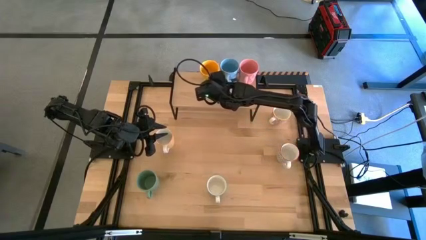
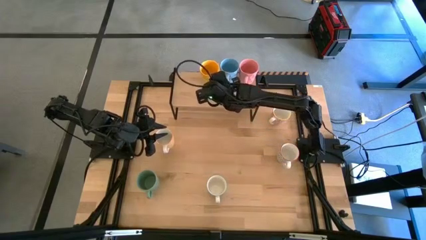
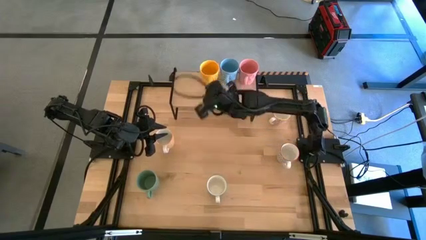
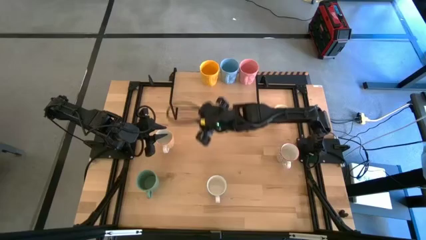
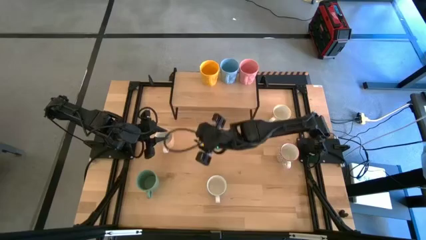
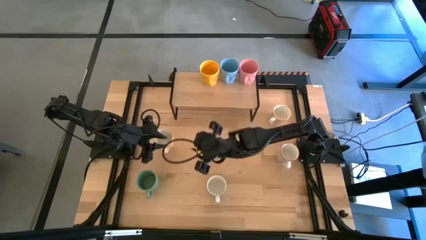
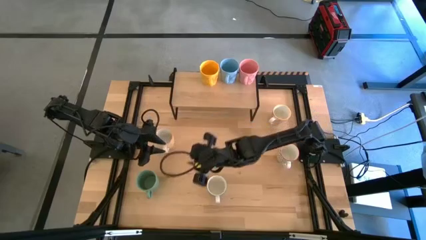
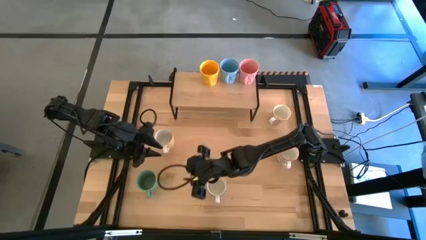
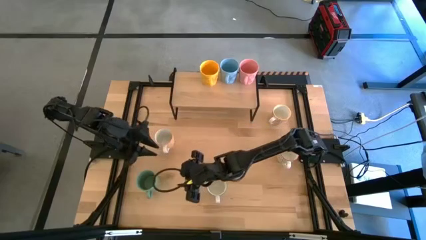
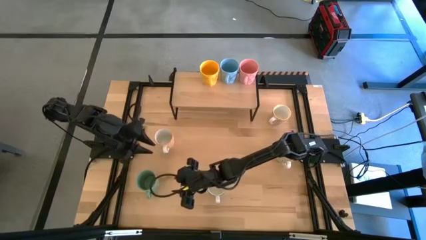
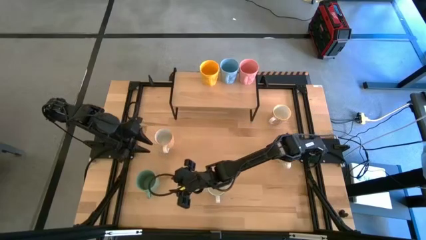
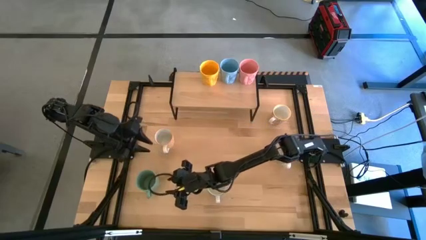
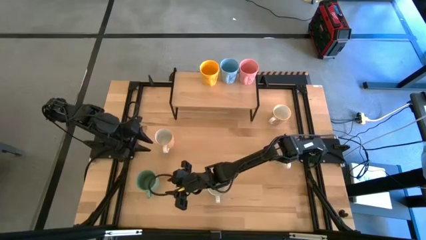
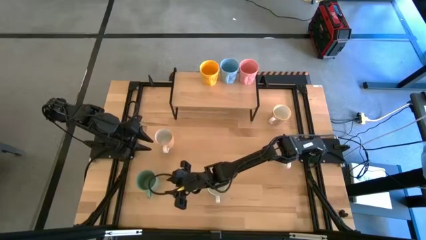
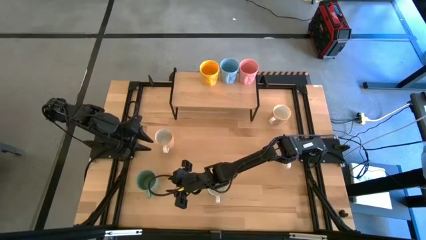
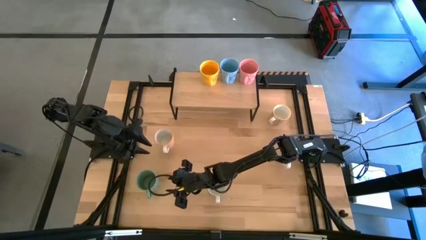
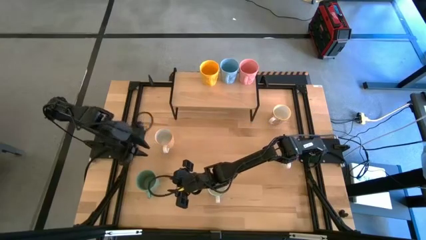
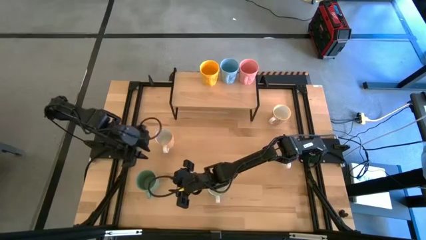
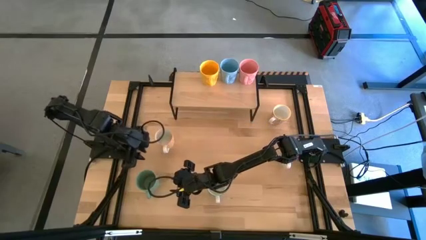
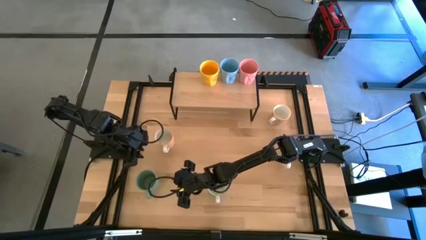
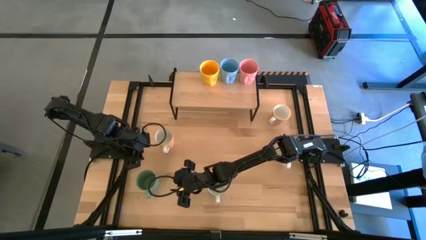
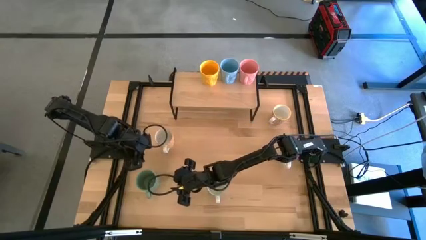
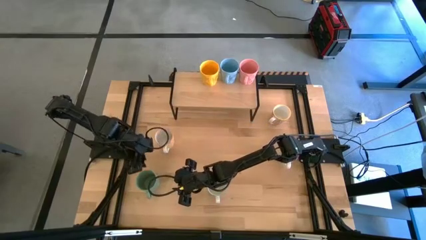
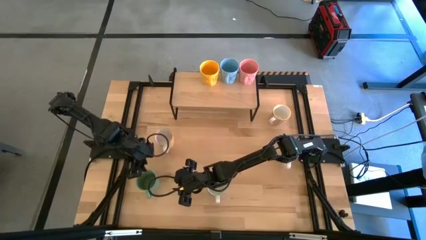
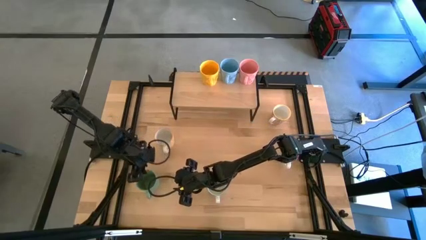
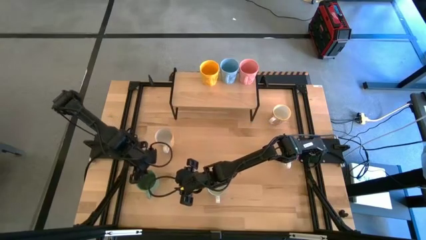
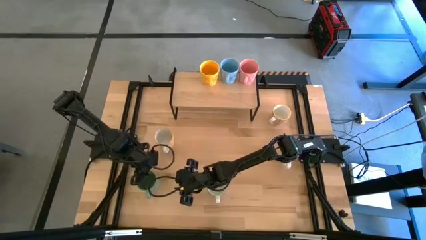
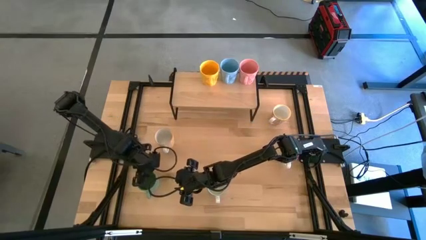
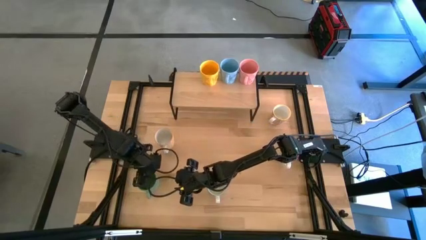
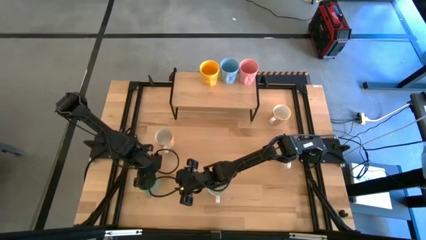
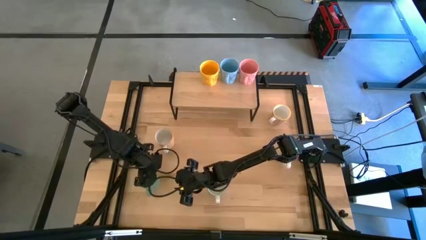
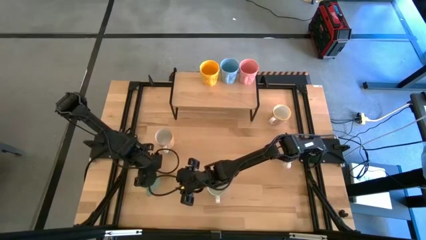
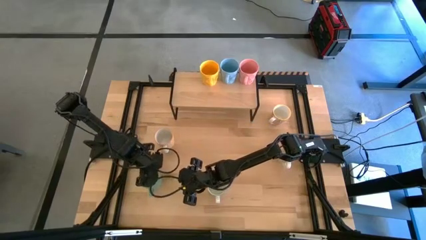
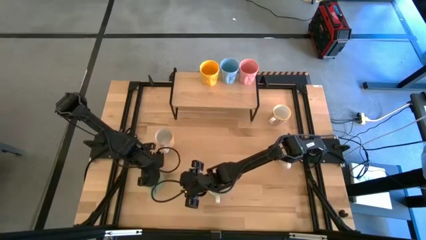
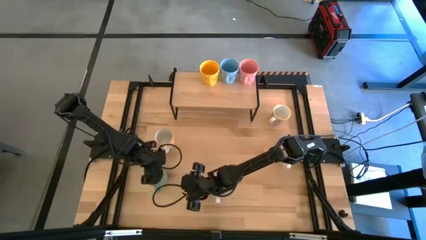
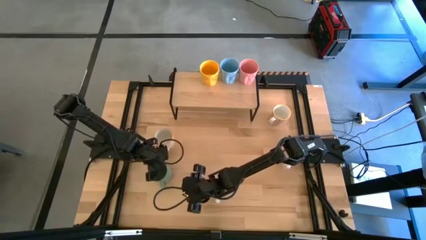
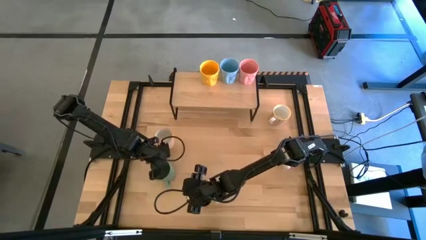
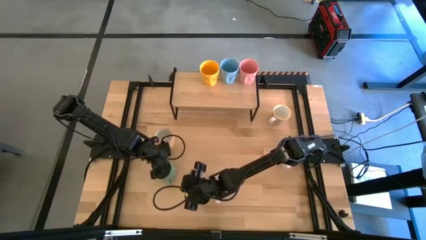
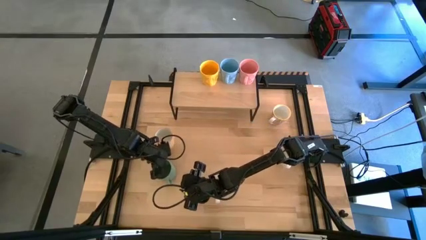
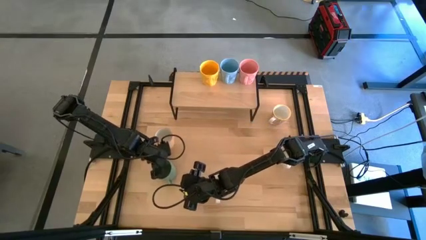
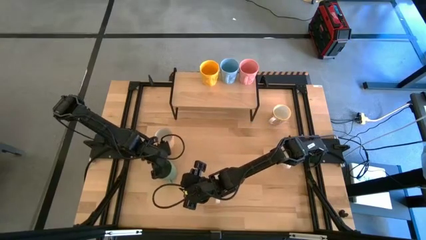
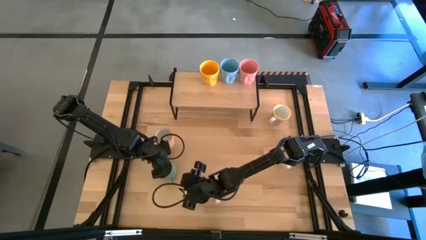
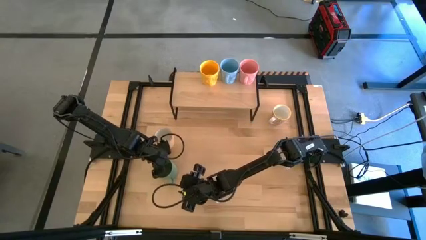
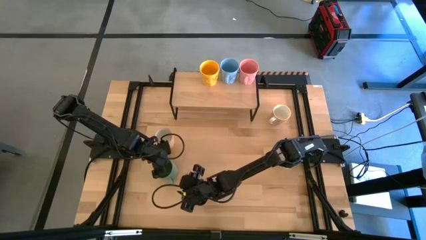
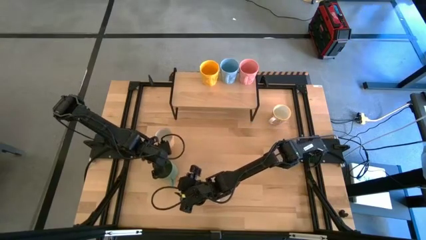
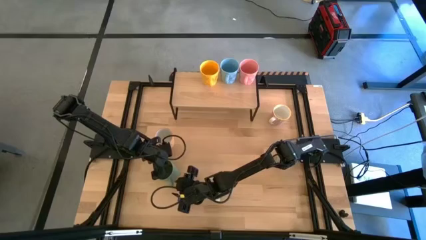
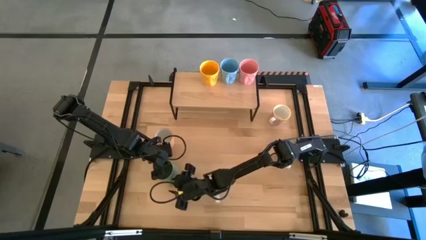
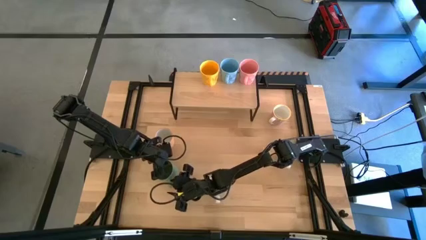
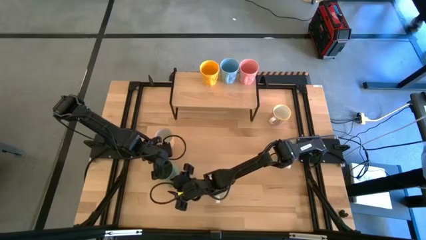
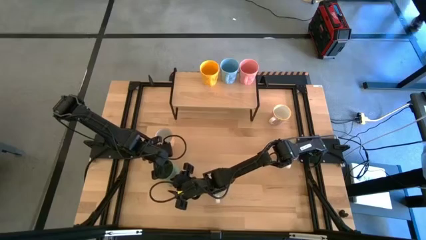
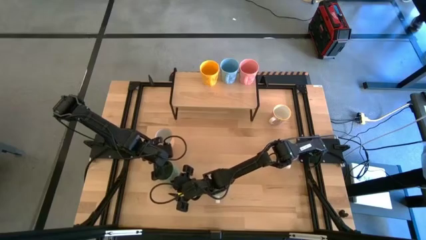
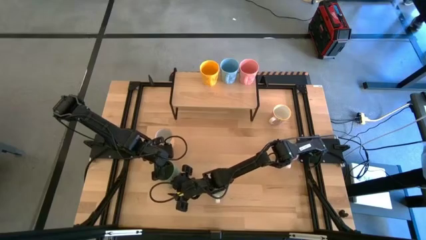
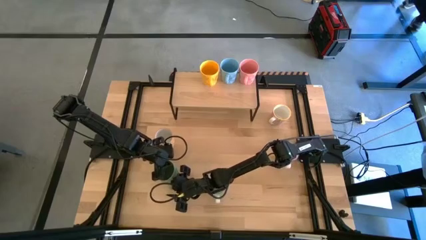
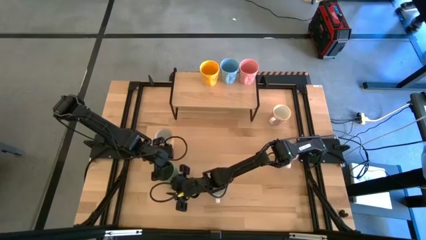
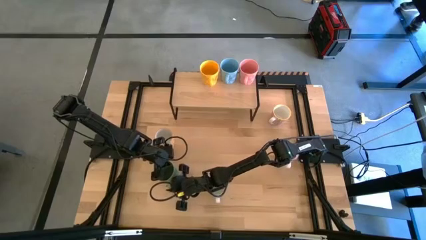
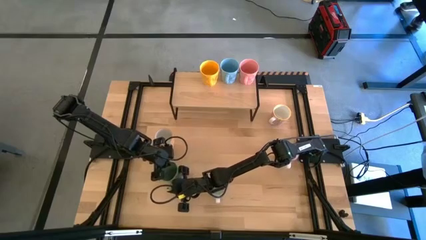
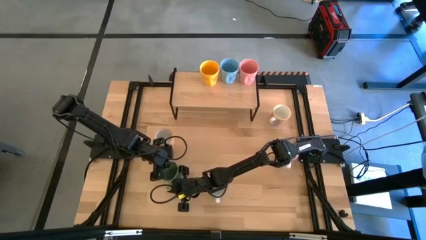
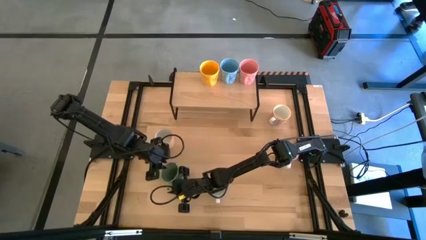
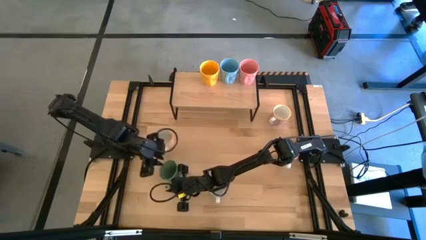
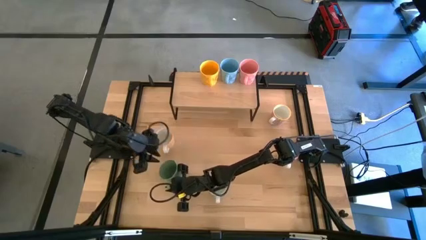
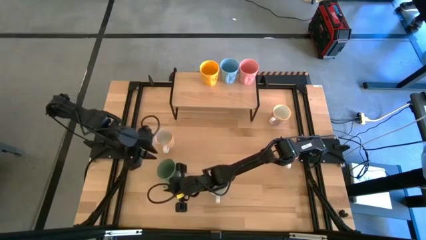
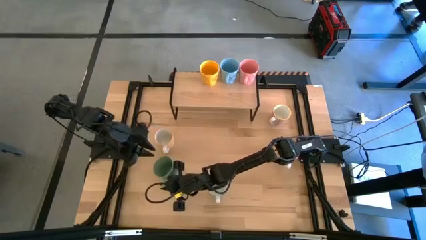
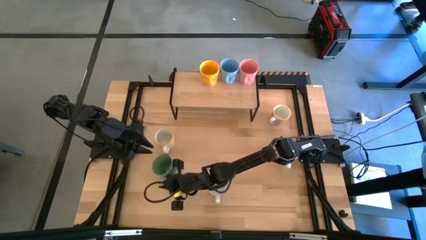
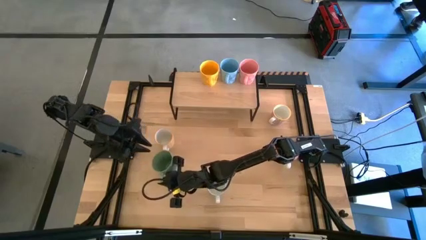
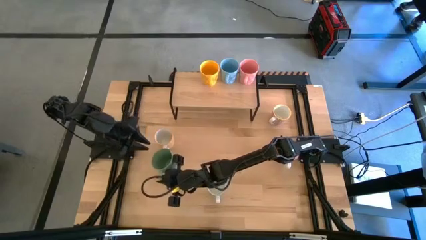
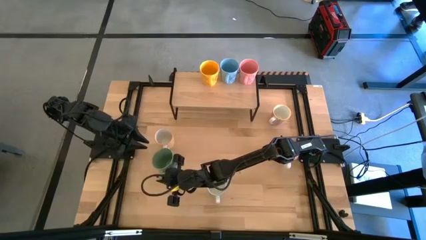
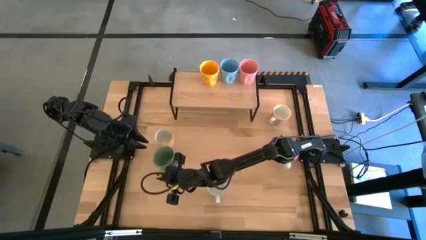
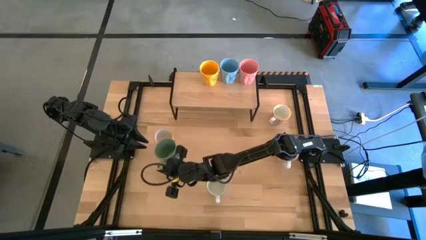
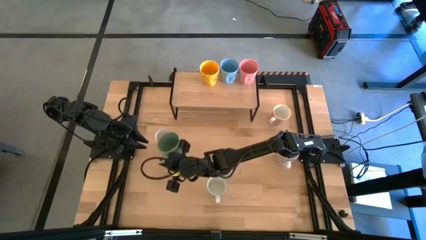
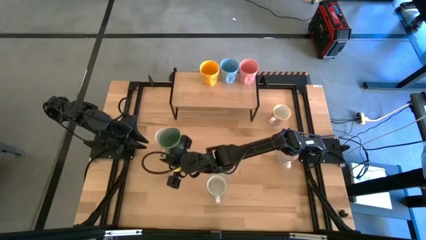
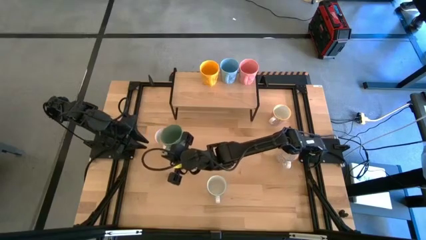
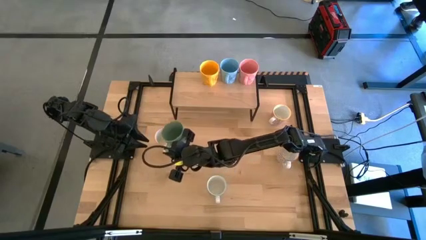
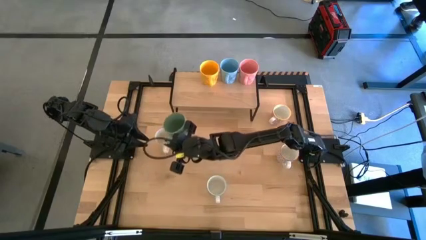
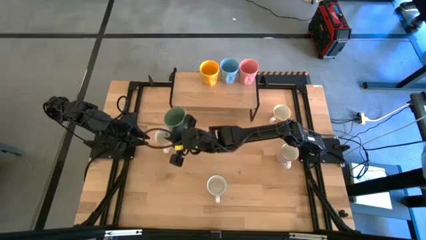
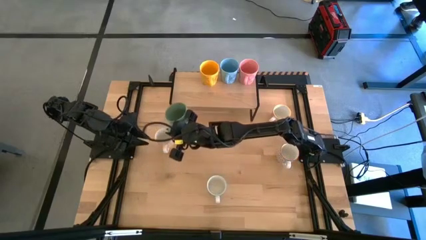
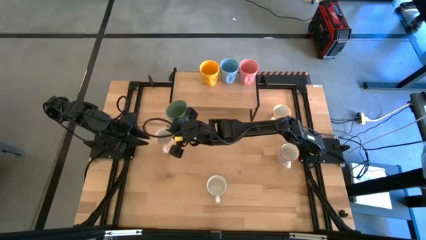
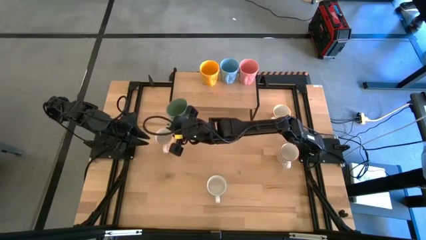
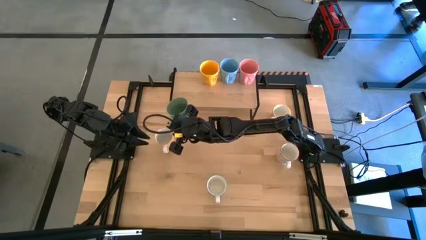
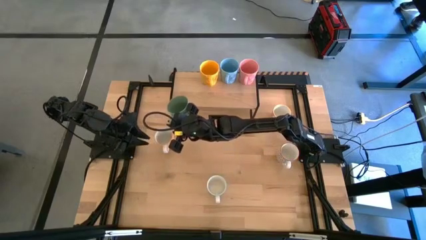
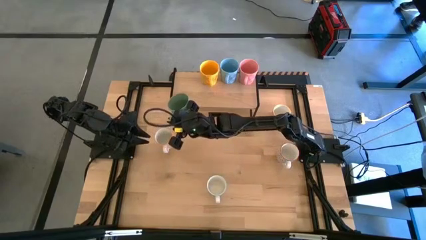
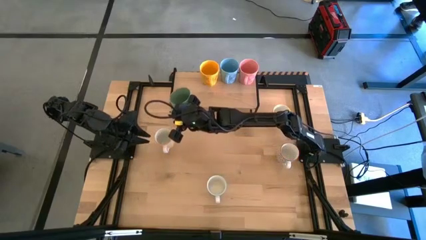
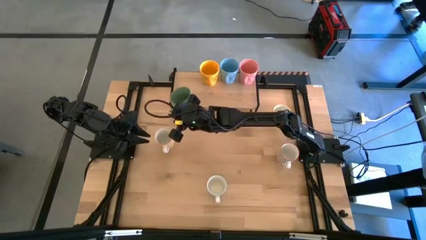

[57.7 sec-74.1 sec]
Task: Place coffee mugs
Put the green mug on the shelf
